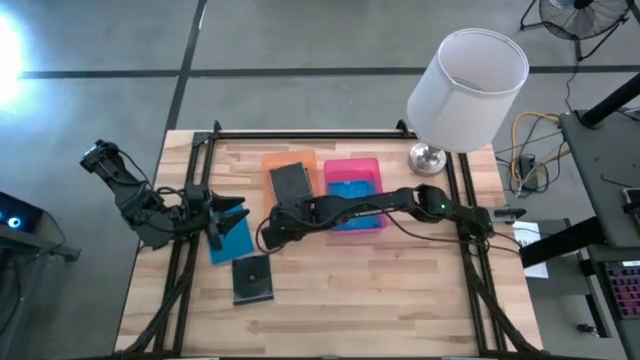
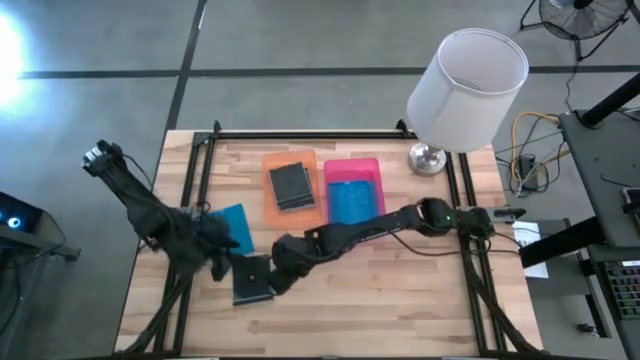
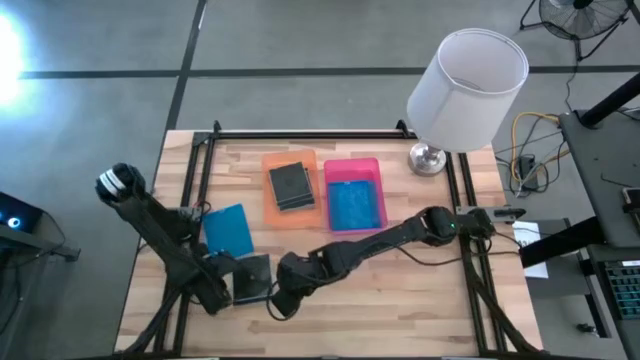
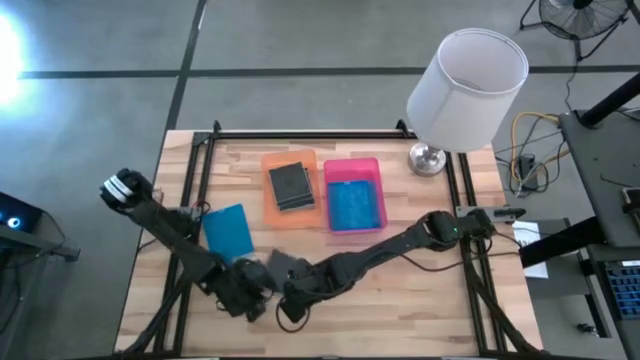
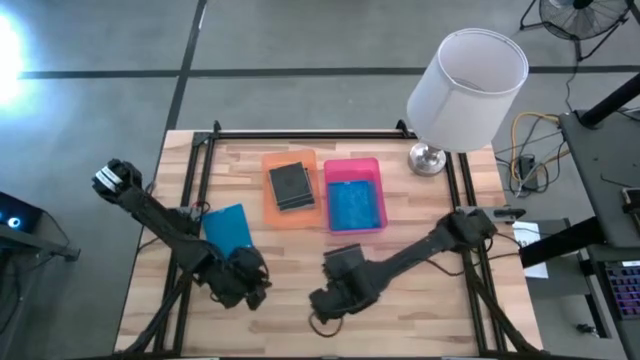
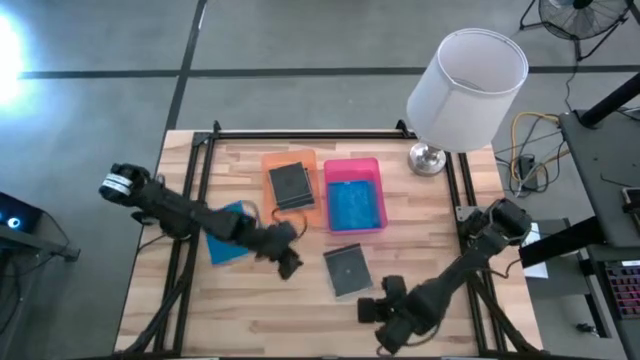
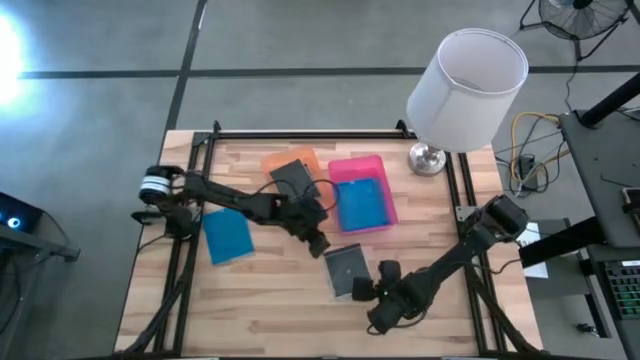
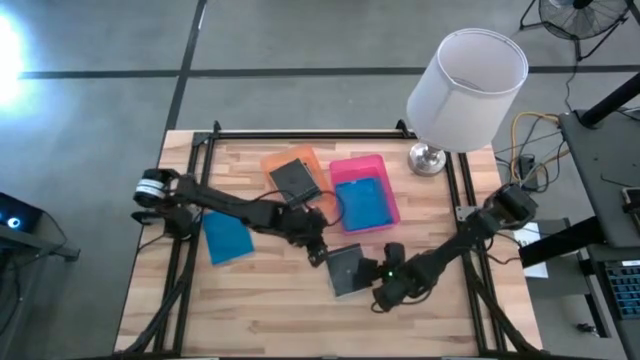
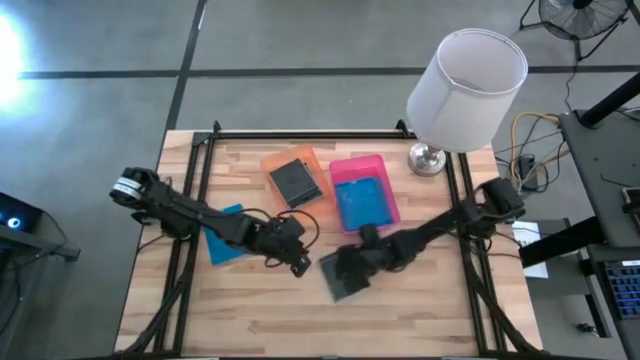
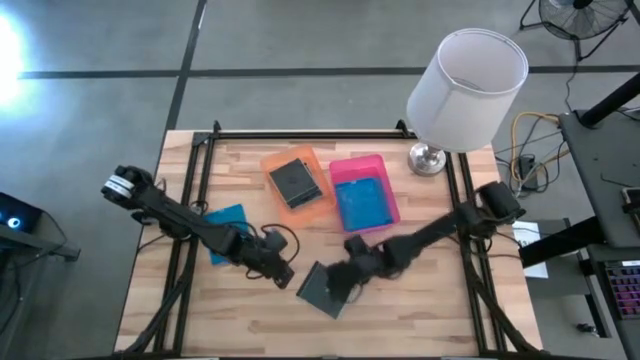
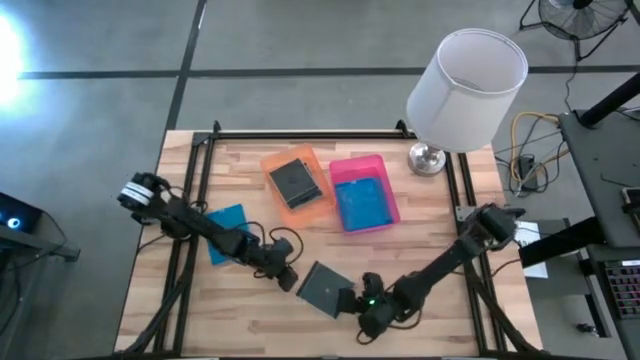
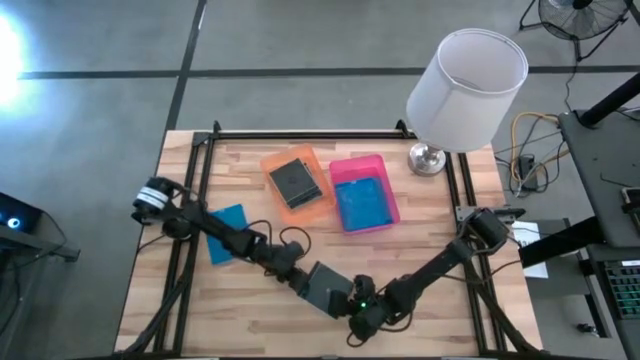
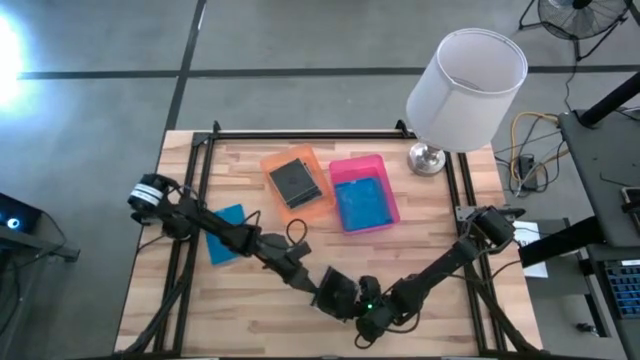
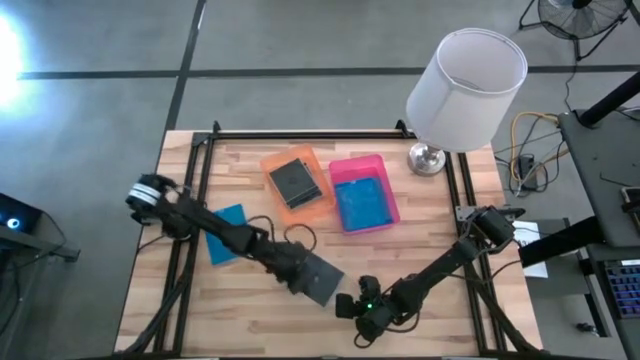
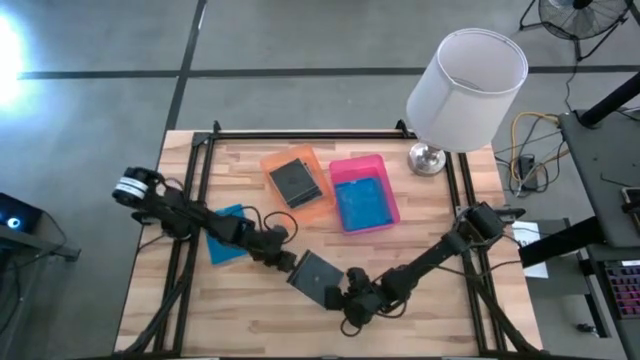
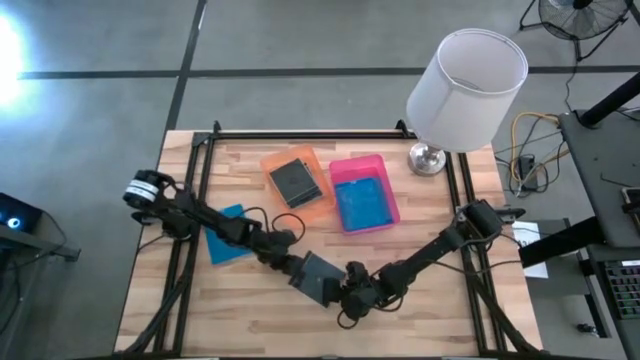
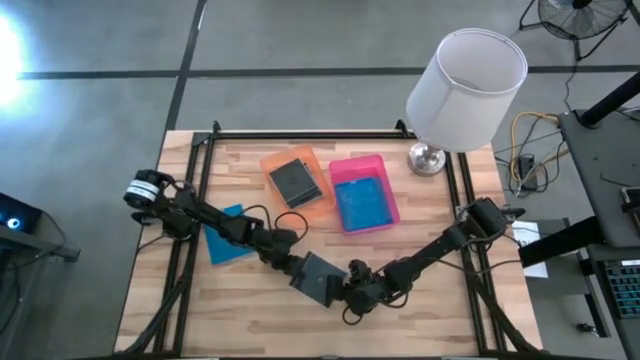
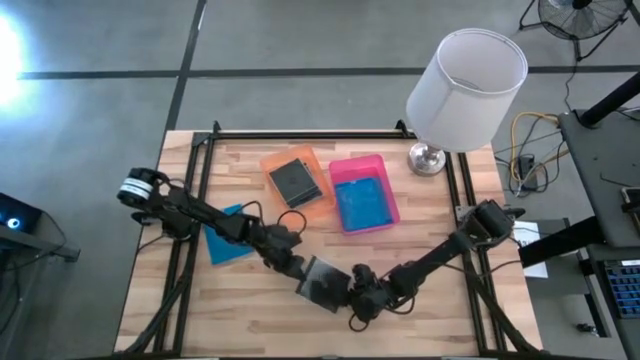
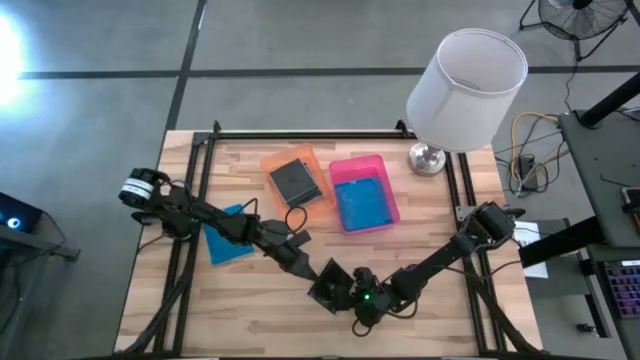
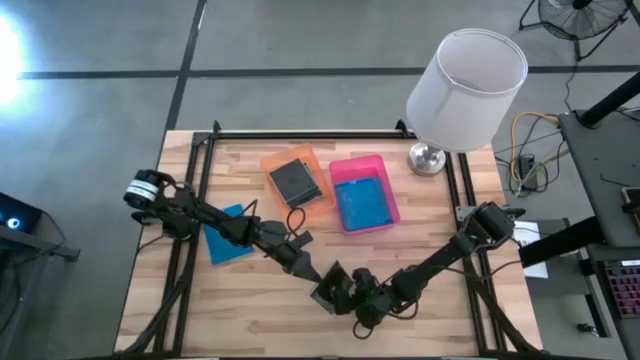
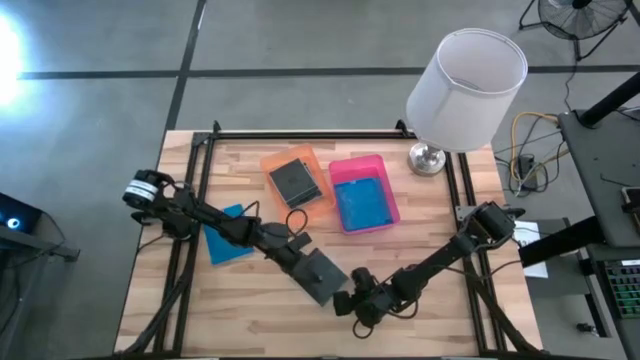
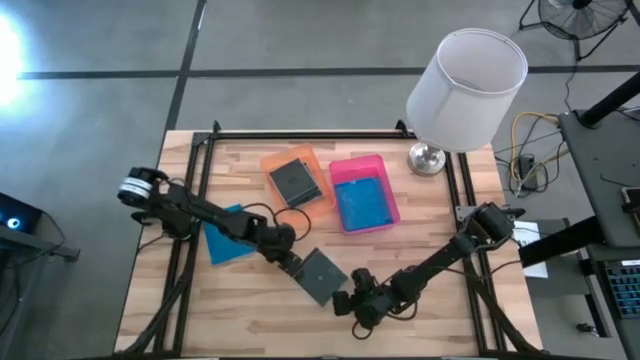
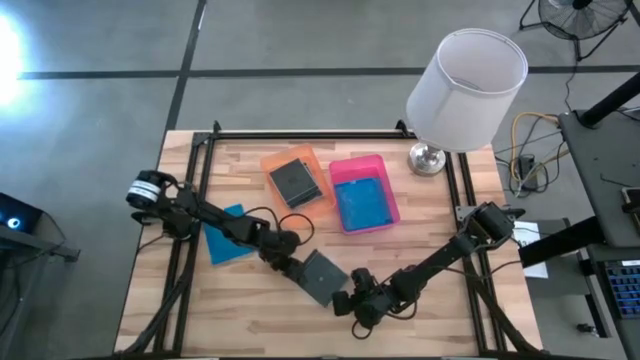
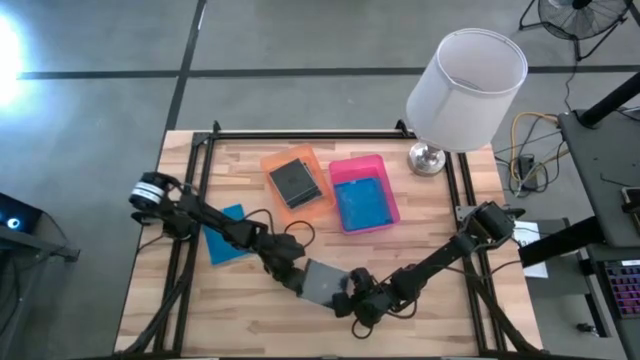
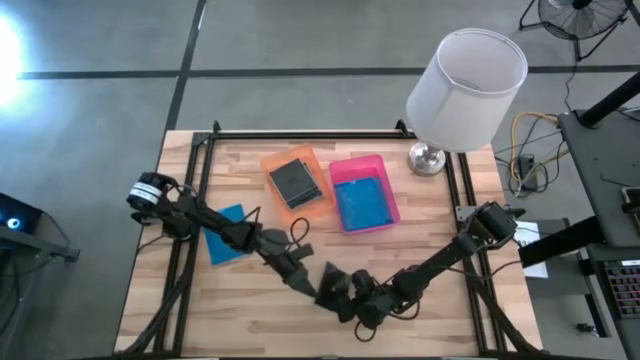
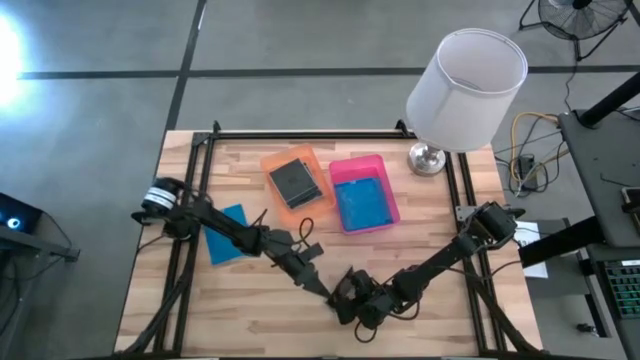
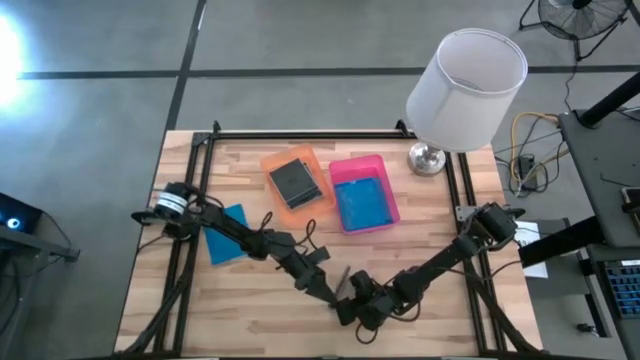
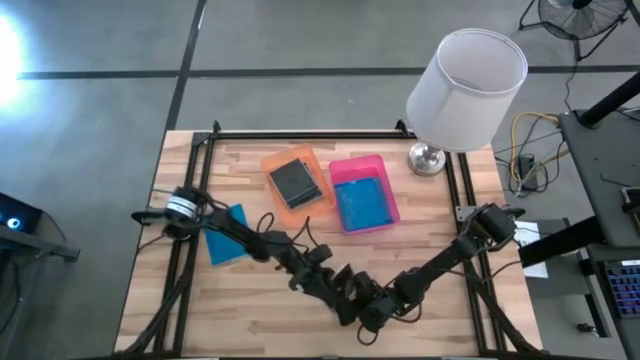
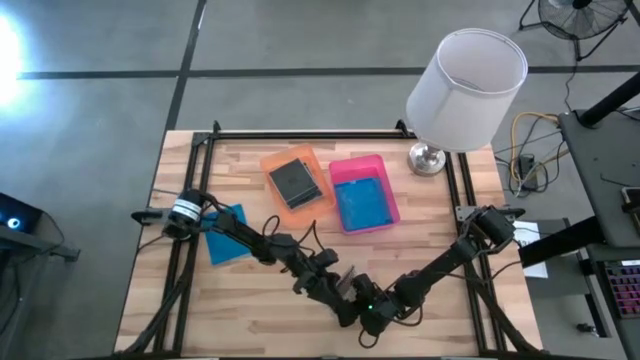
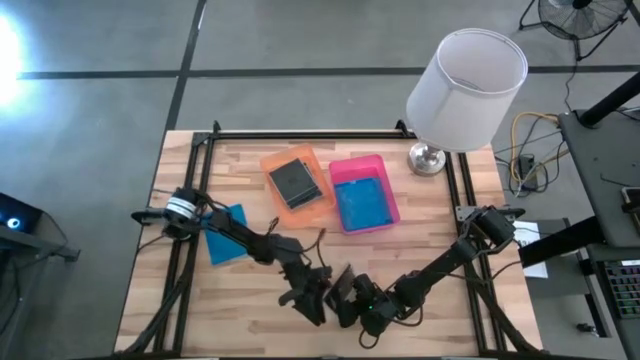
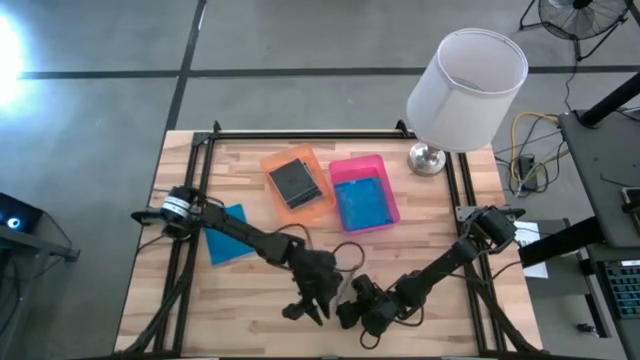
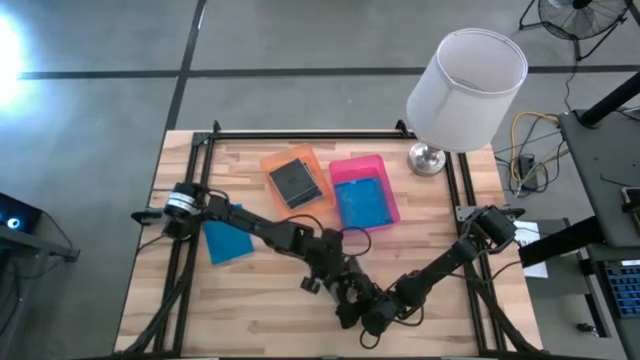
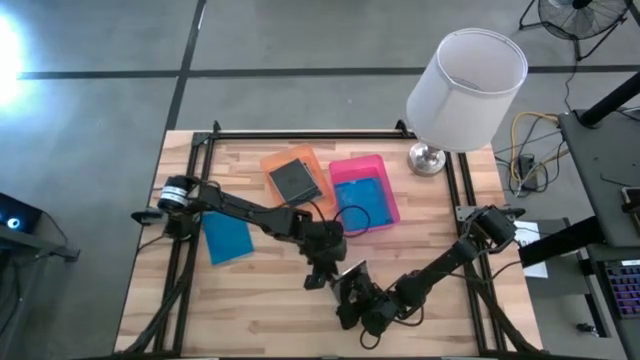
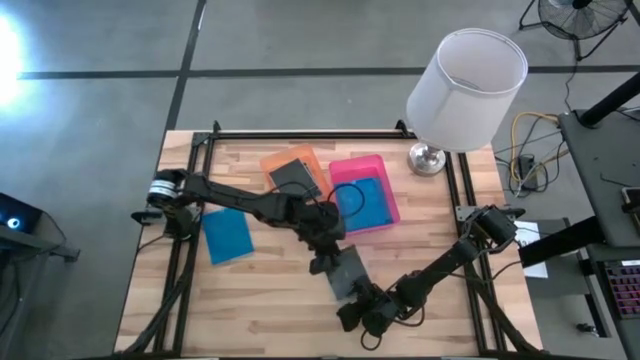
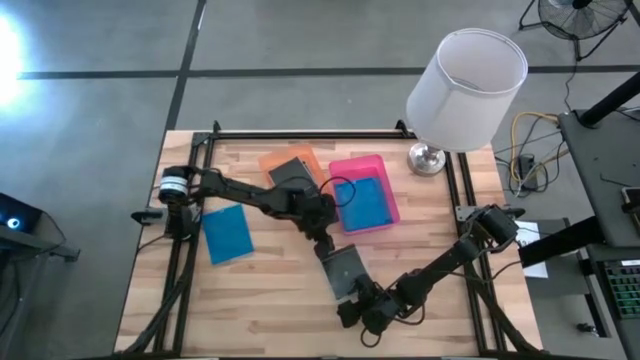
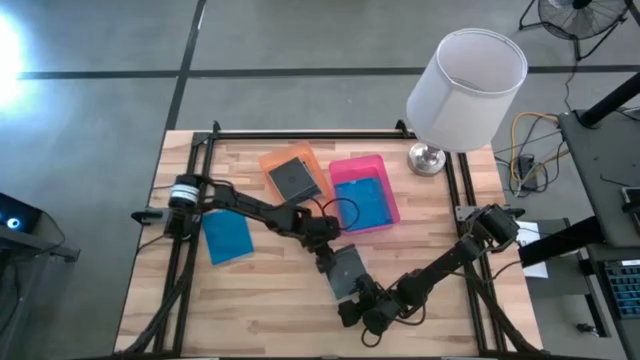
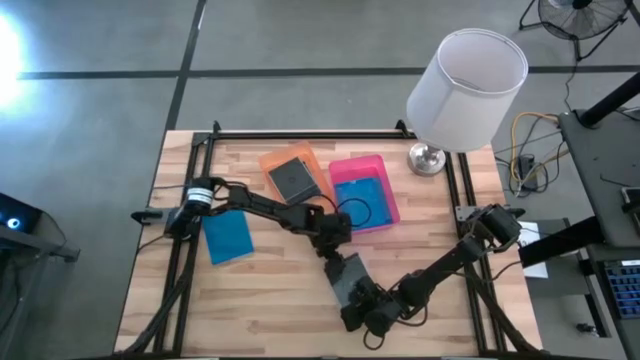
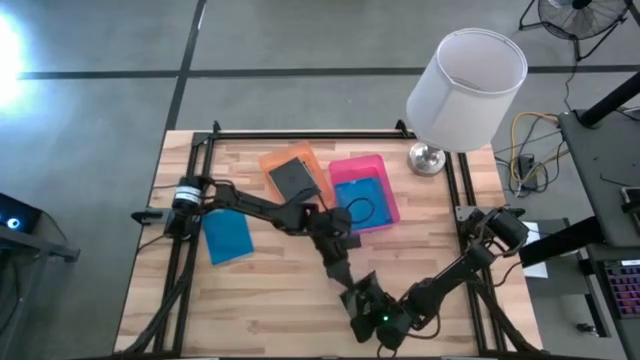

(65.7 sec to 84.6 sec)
Task: Pick & place jewel cases by type
Put the black cd case into the orange bin

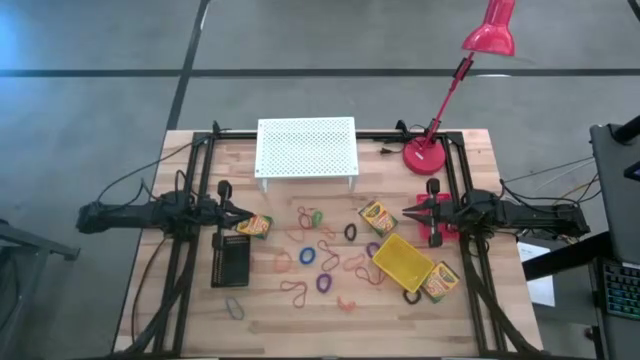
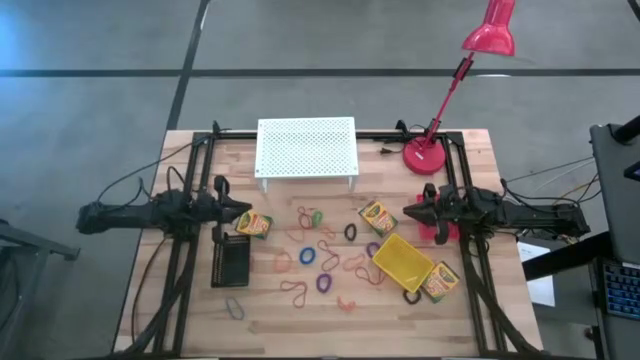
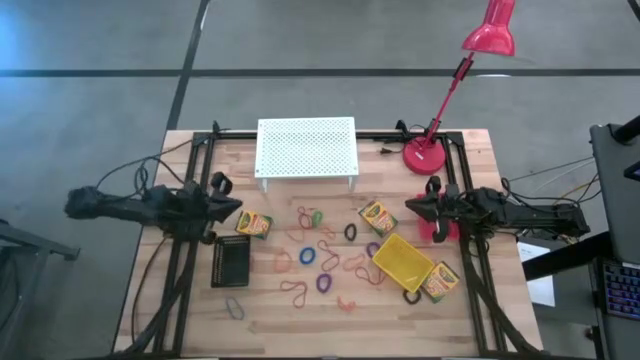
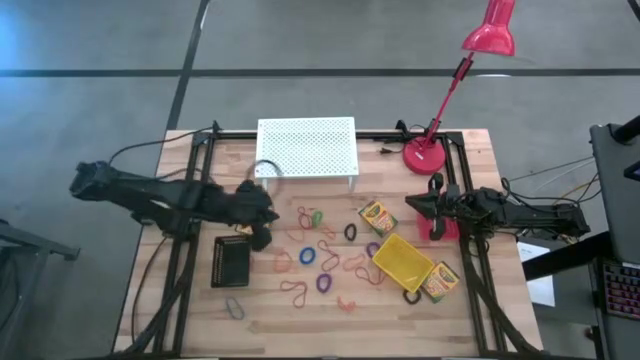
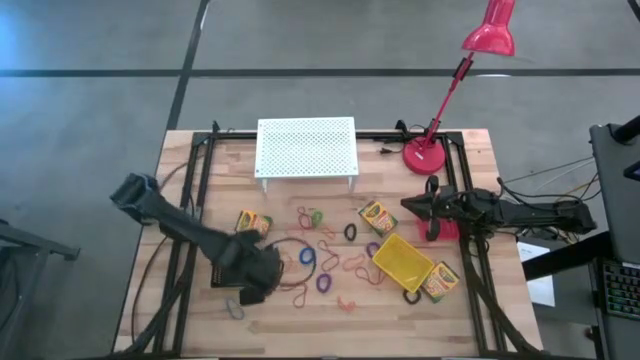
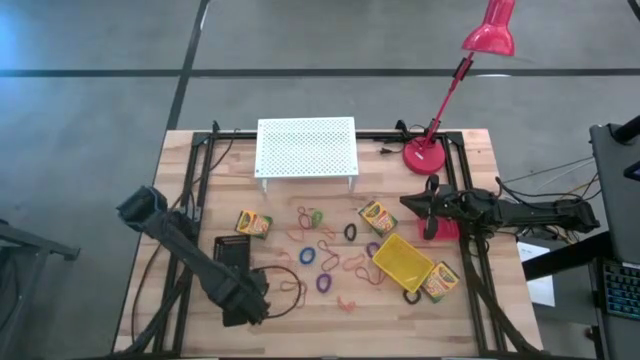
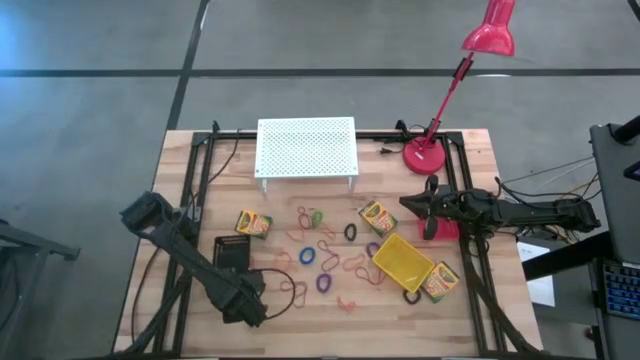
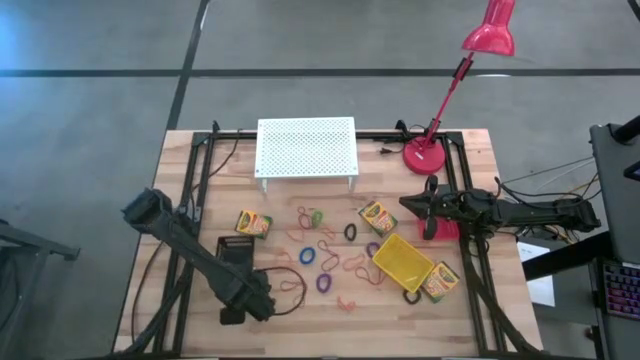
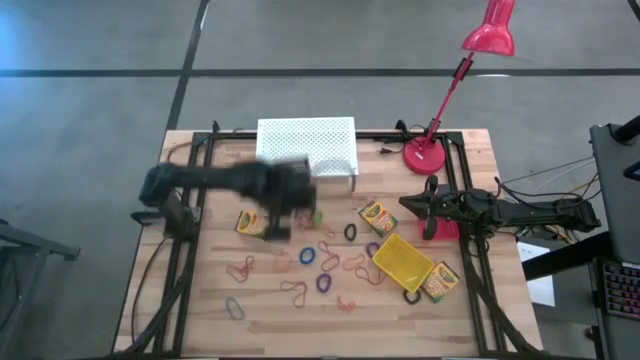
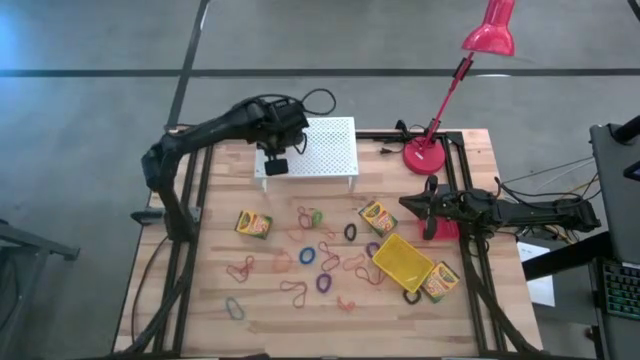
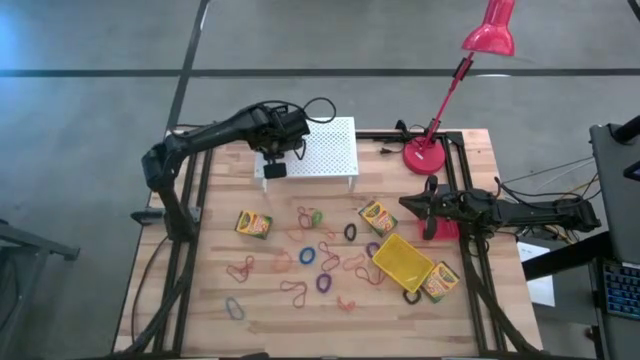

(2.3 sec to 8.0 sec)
Task: Pick & Place Office Desk Supplies
Put the black bin on the shelf
